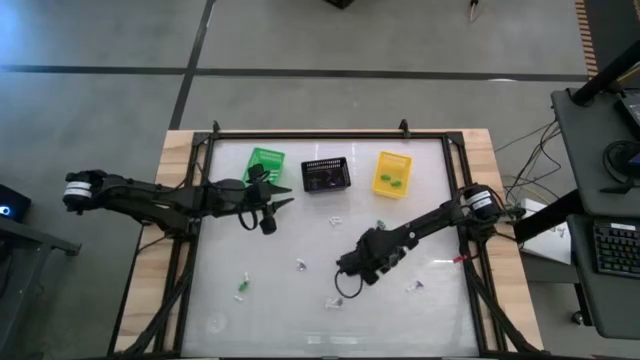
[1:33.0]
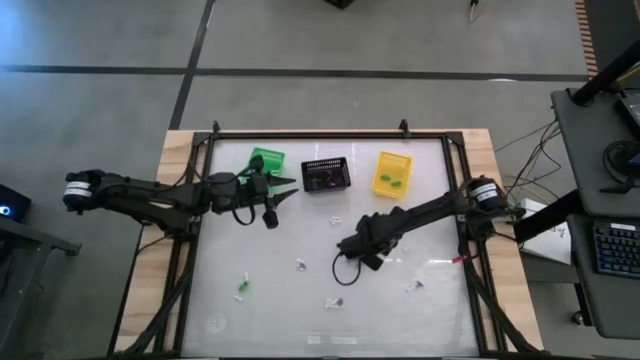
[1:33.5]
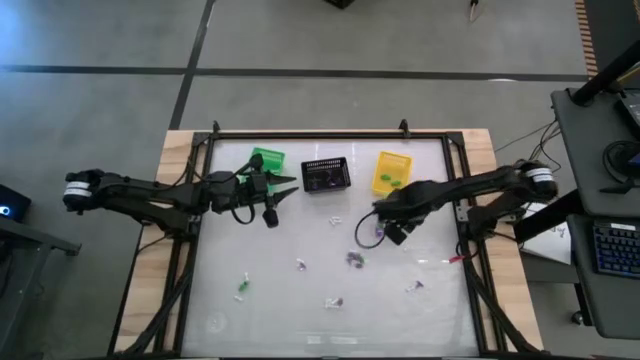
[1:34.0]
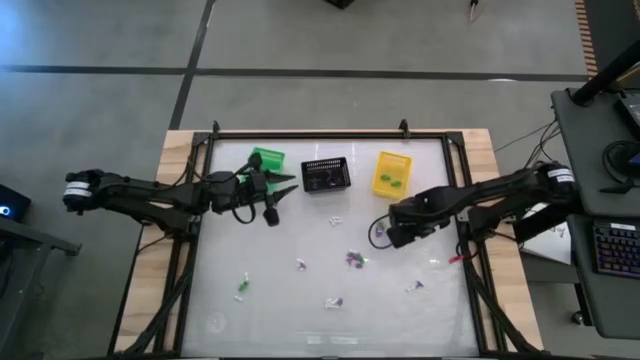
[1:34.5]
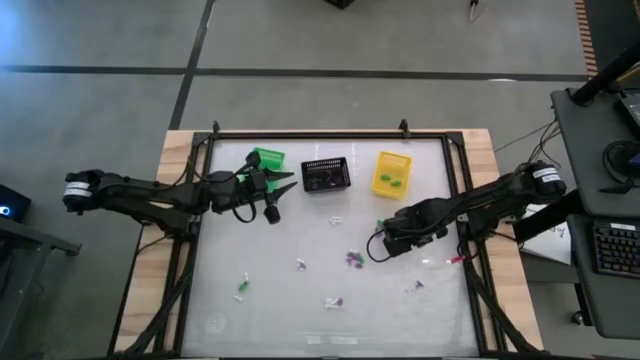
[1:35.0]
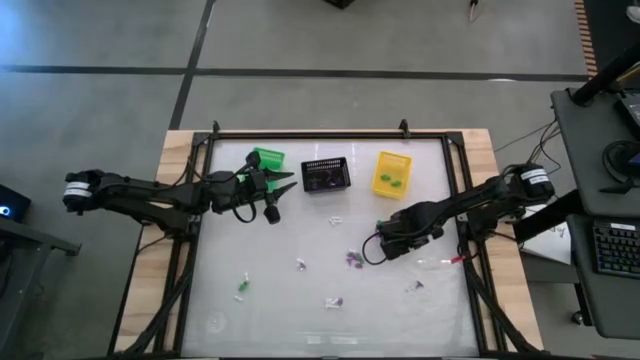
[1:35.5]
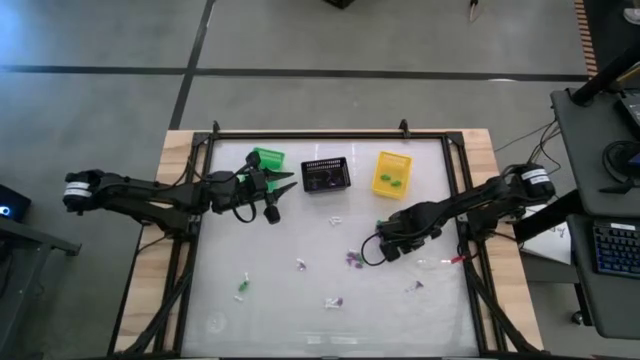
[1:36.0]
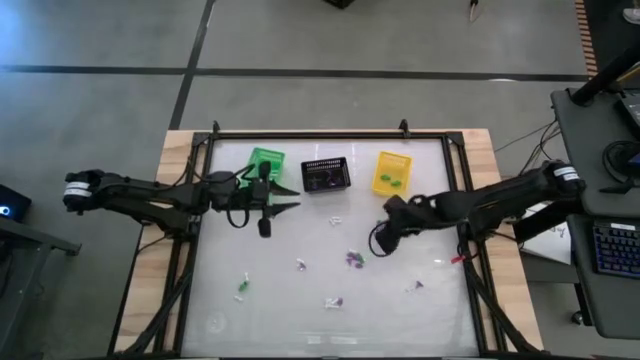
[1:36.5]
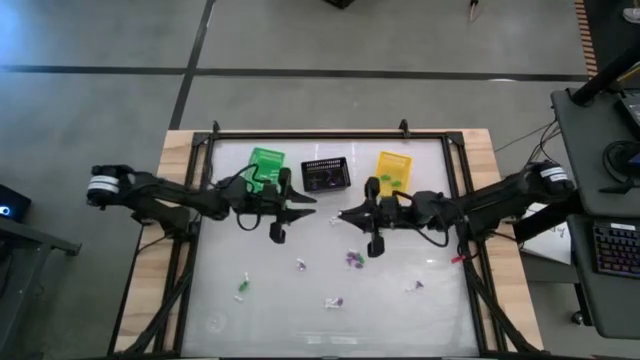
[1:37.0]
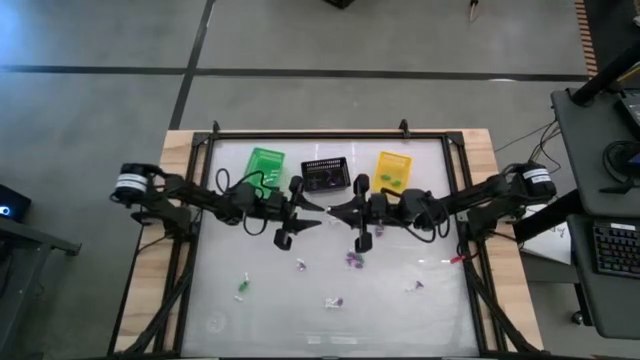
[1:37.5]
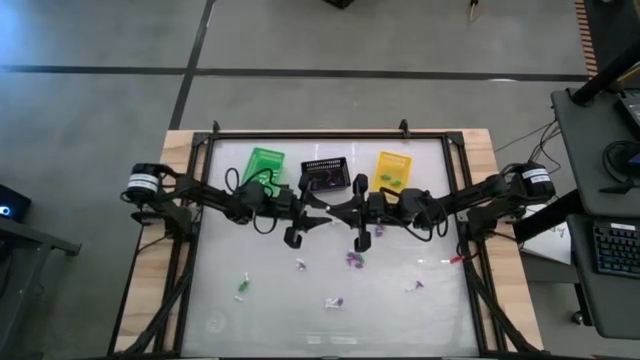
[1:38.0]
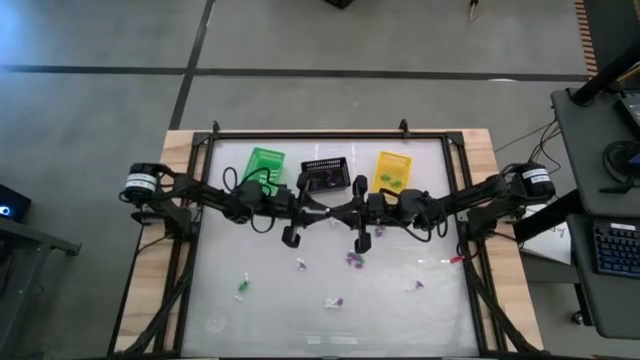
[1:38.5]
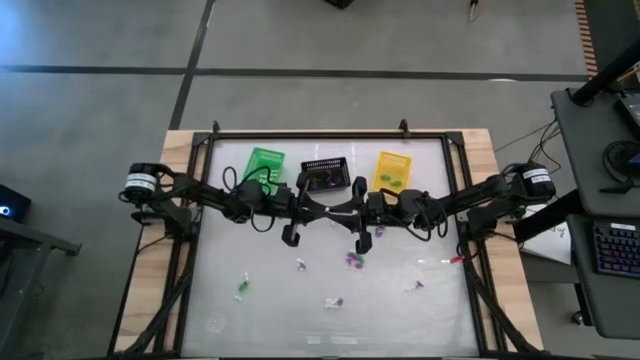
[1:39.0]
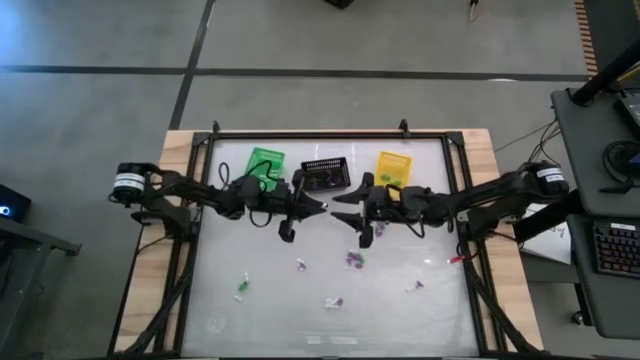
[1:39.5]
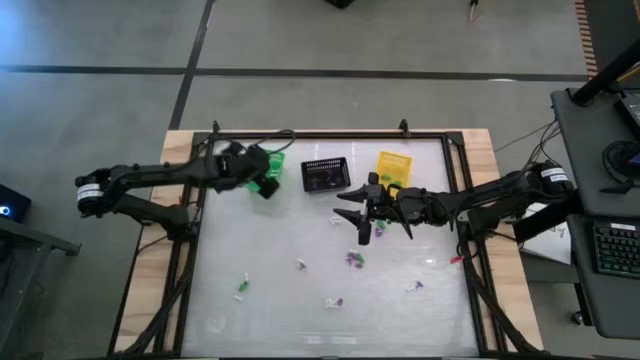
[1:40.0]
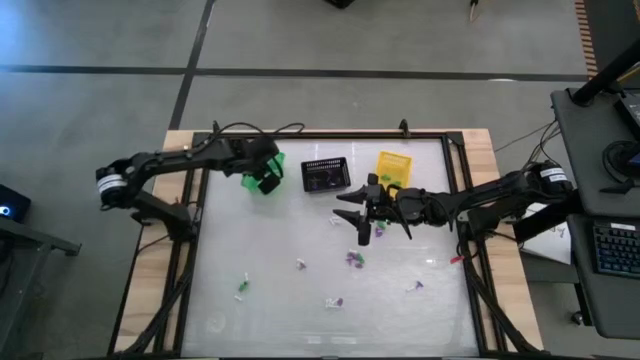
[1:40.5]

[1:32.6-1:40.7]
Task: Sort Halloween decoration
Put the white bone toy into the green basket

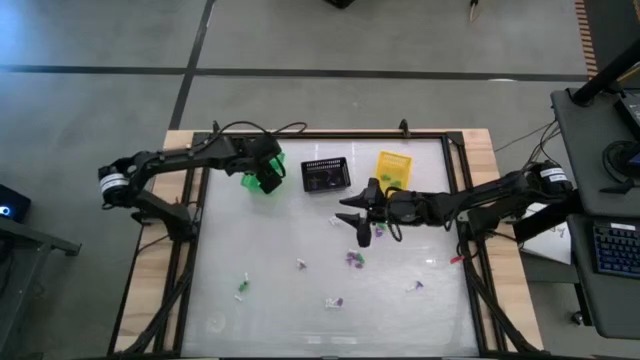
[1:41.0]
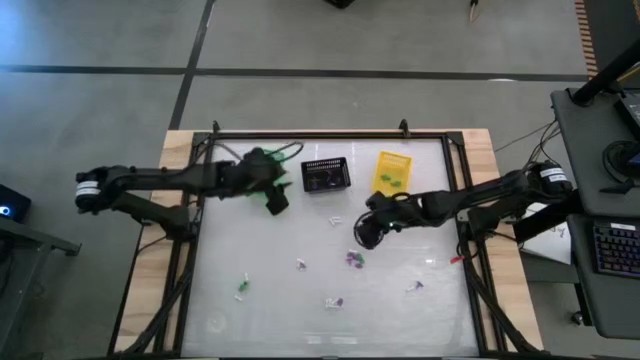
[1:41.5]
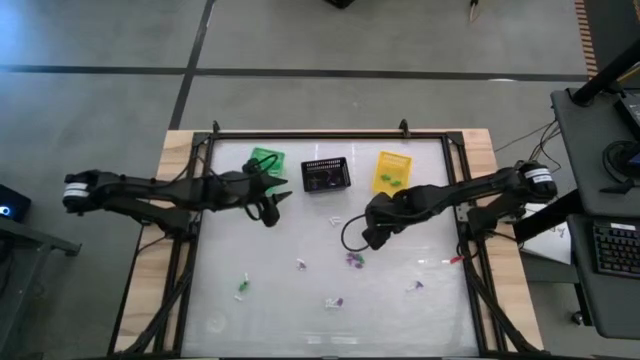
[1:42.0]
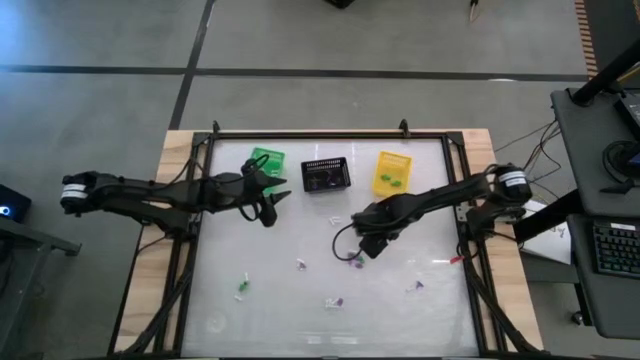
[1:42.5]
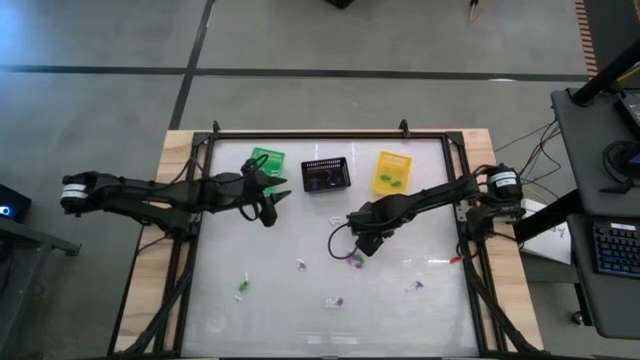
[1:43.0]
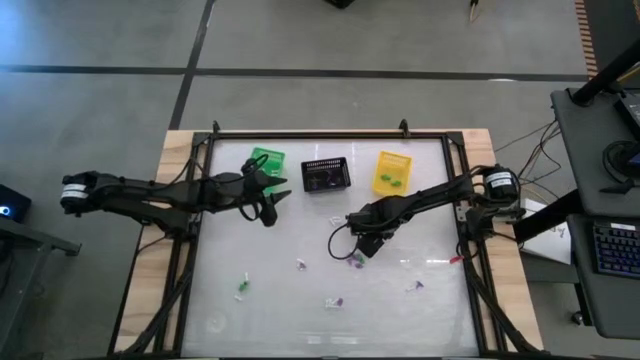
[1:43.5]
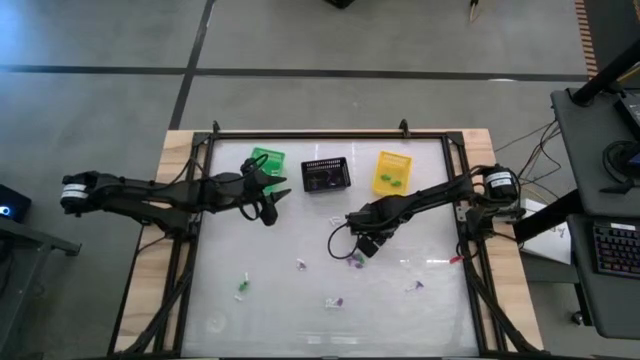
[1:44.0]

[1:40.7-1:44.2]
Put the purple witch hat toy into the black basket

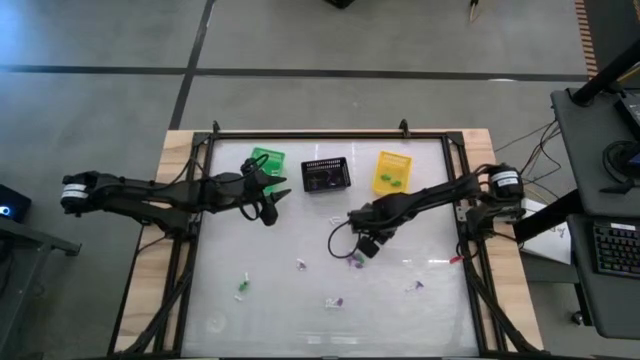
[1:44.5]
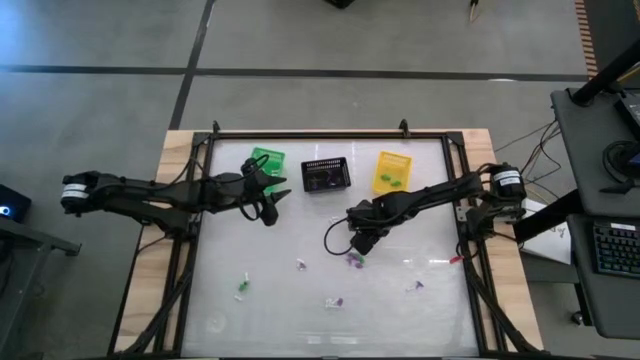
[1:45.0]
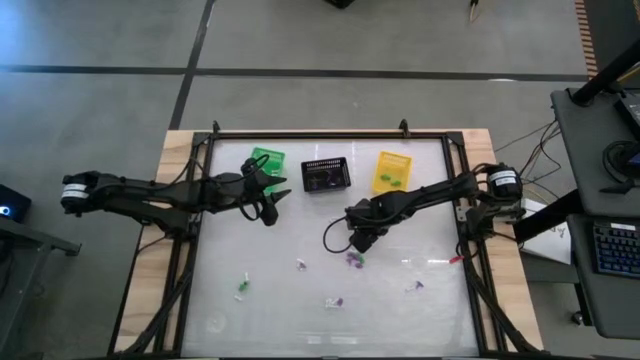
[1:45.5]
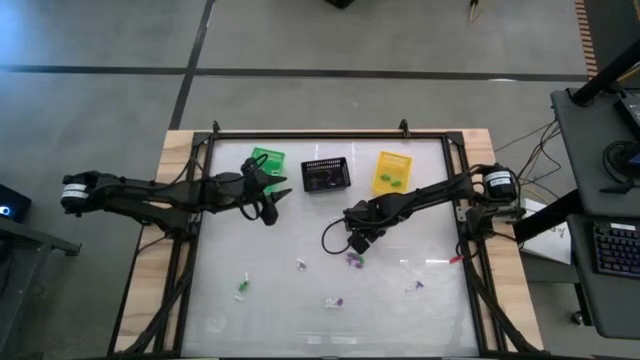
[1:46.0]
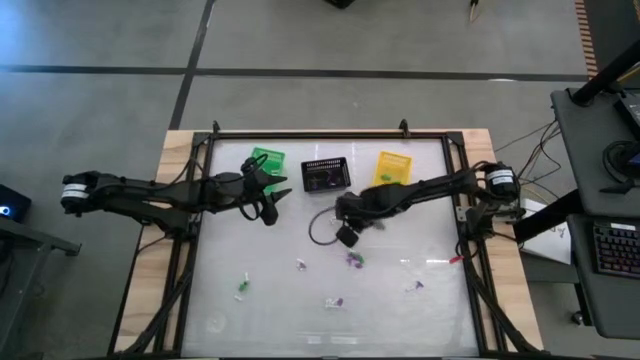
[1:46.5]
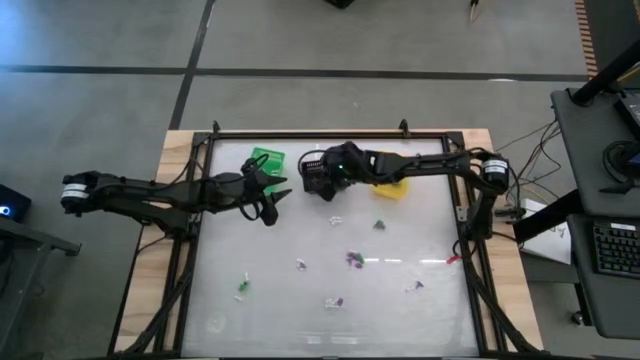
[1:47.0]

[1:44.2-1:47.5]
Put the purple witch hat toy into the black basket

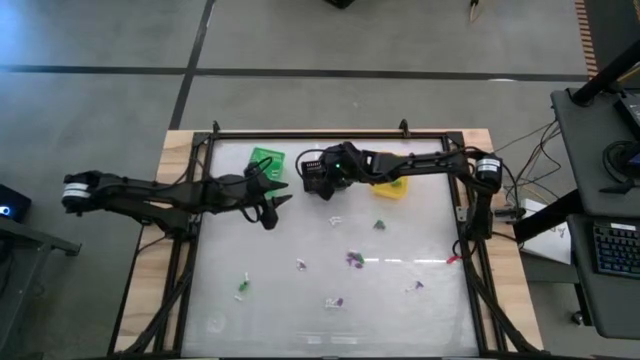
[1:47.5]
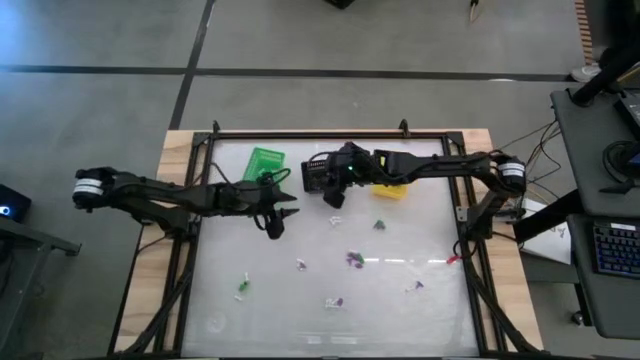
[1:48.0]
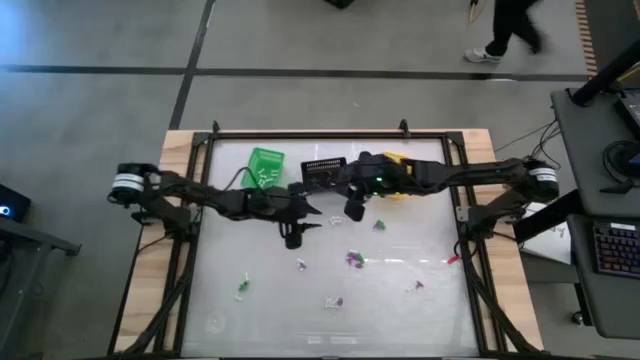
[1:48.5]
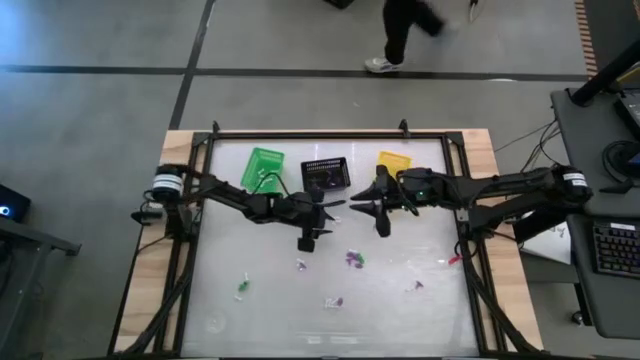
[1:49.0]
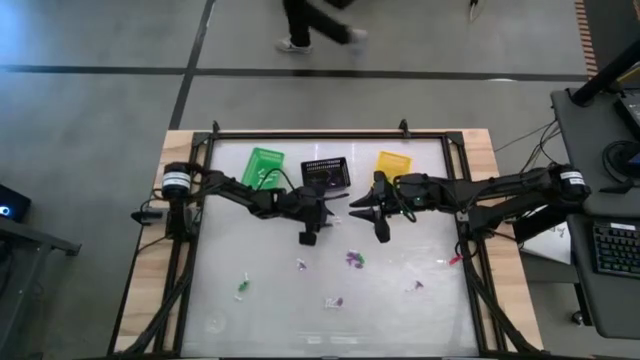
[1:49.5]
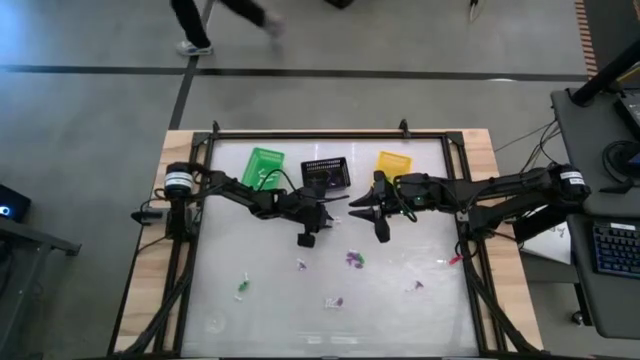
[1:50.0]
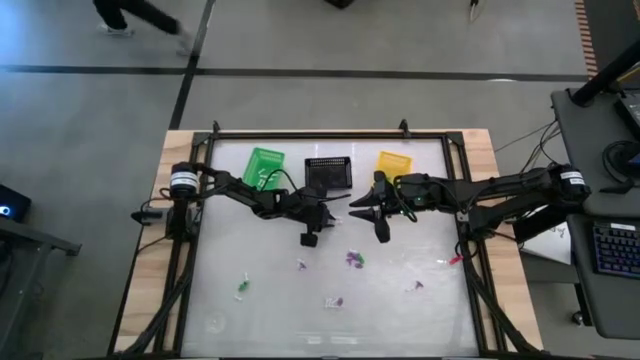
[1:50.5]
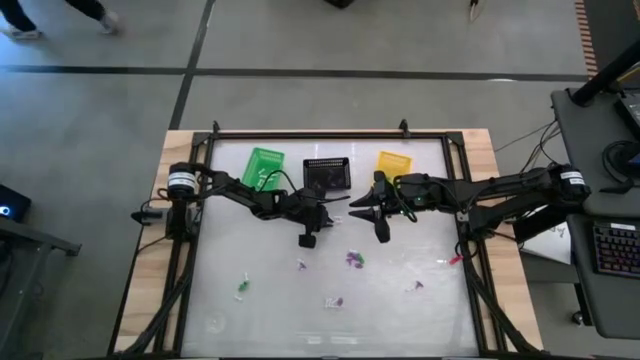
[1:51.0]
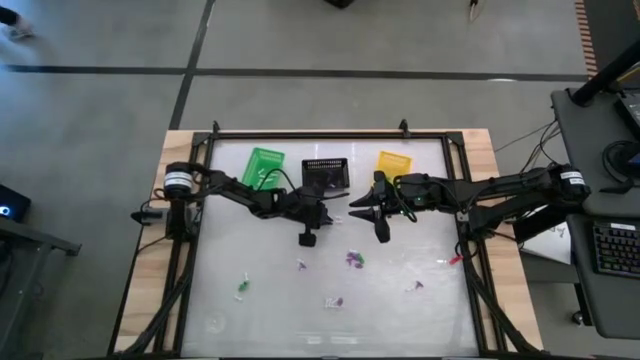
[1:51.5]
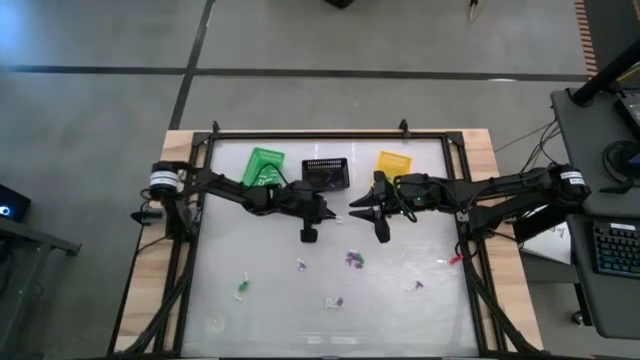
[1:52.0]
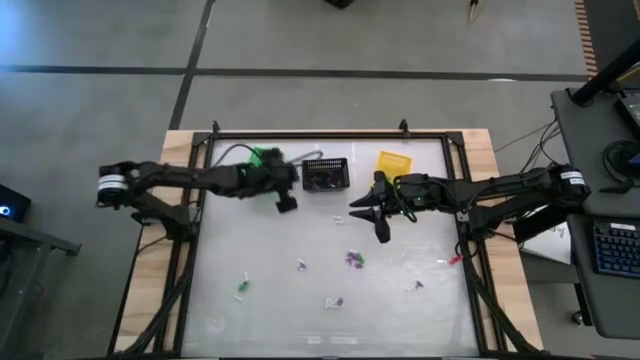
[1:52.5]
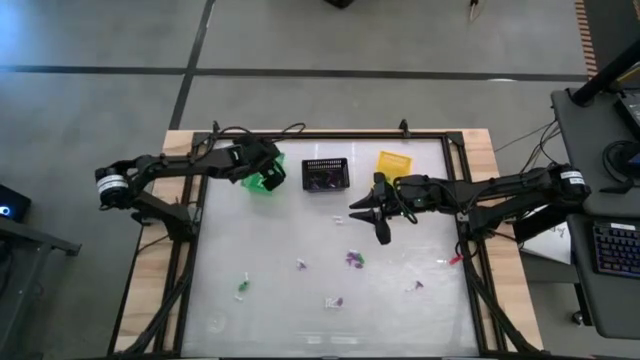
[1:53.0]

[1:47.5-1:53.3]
Put the white bone toy into the green basket

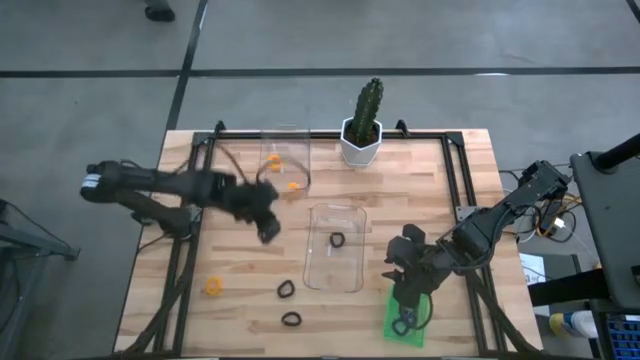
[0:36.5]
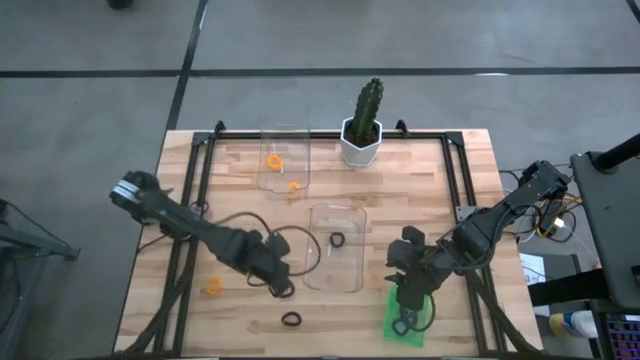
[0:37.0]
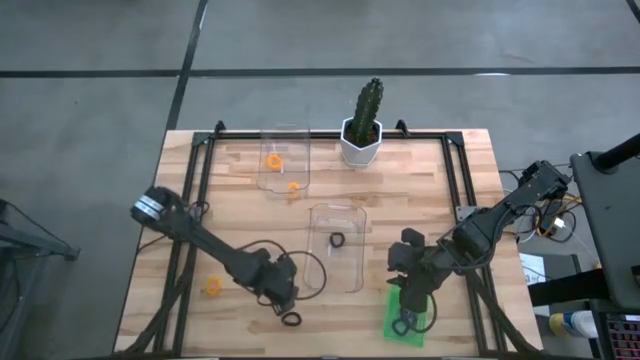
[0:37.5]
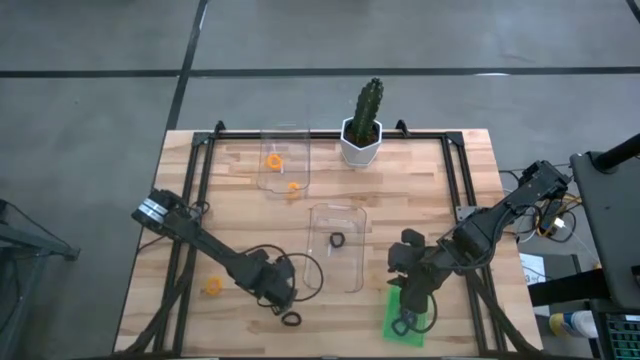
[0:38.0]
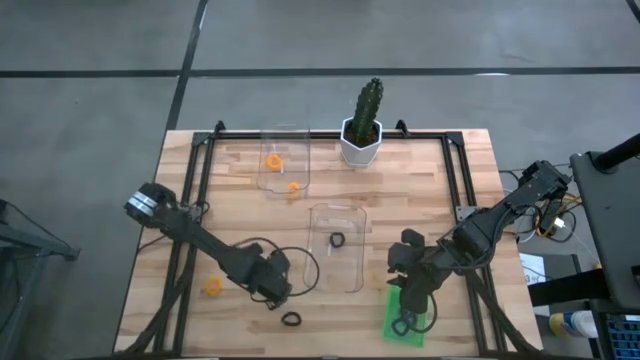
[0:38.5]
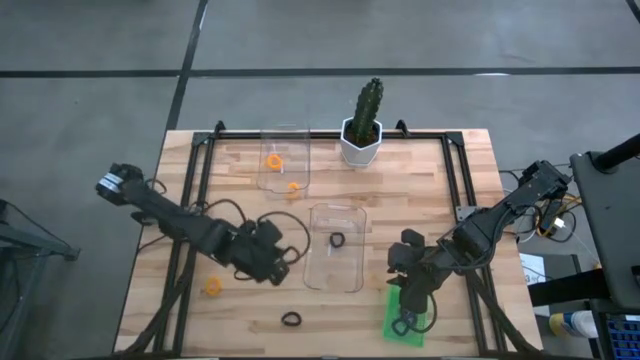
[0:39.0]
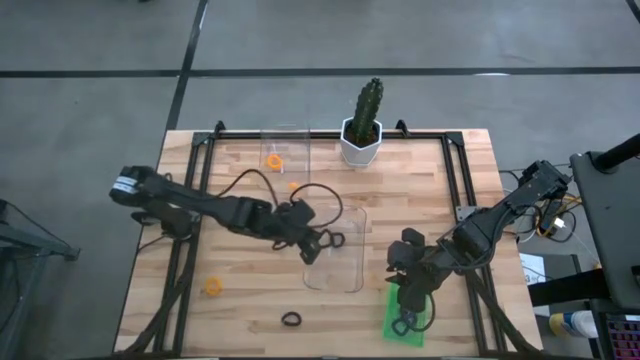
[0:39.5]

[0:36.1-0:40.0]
Task: Sort spring keychains
Put the top black spring keychain into the bottom transparent bin
